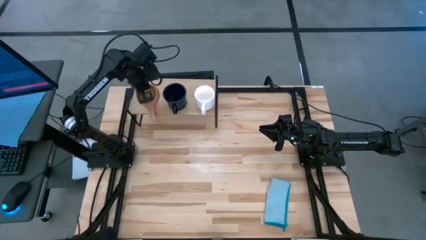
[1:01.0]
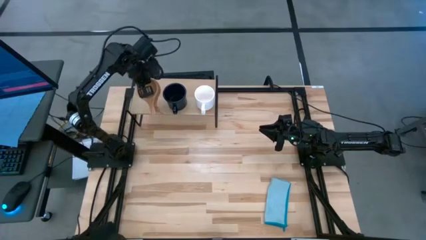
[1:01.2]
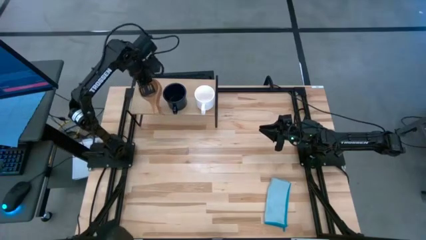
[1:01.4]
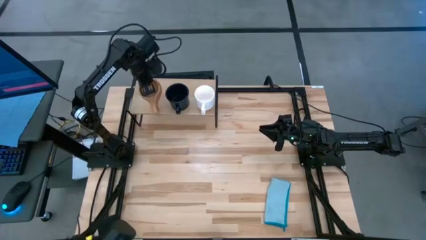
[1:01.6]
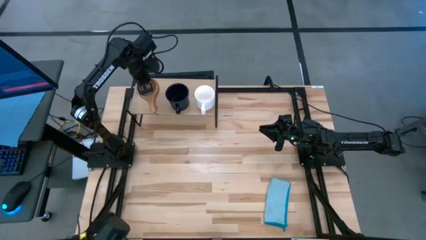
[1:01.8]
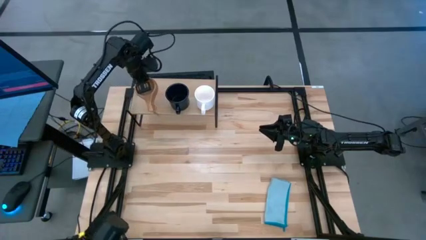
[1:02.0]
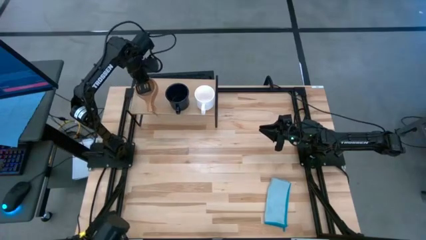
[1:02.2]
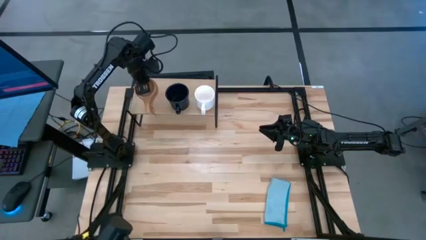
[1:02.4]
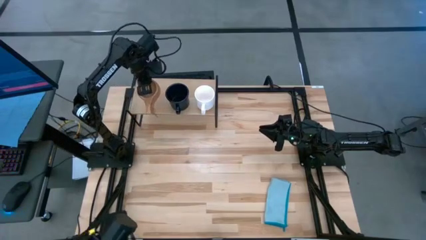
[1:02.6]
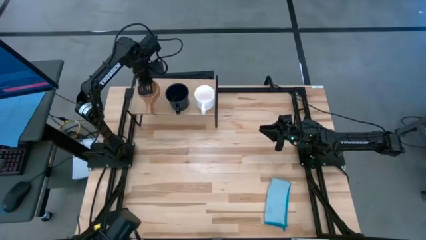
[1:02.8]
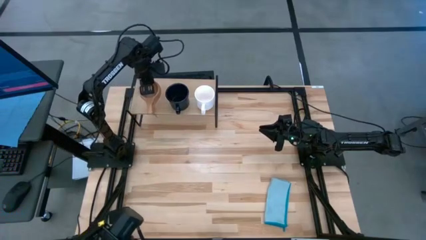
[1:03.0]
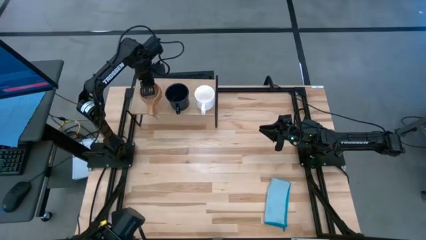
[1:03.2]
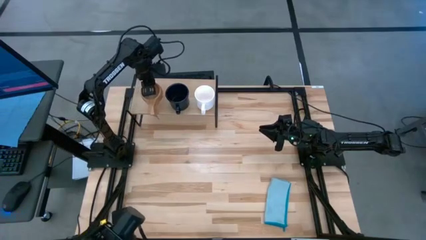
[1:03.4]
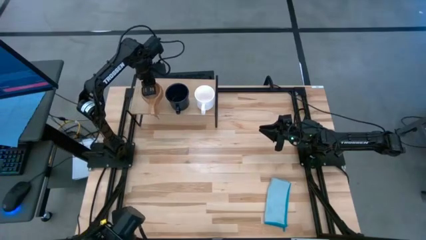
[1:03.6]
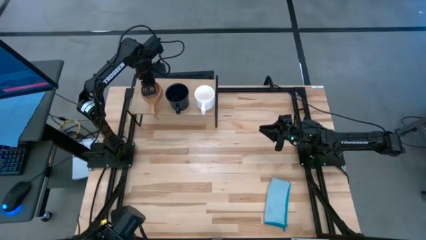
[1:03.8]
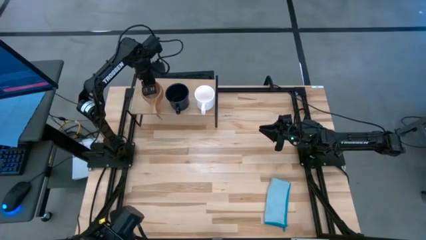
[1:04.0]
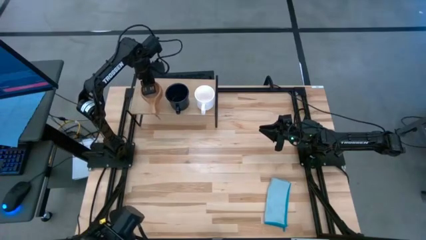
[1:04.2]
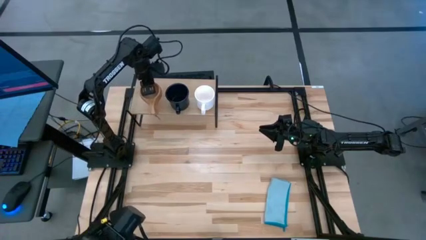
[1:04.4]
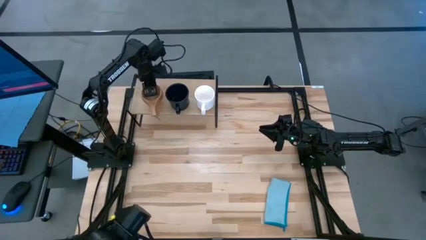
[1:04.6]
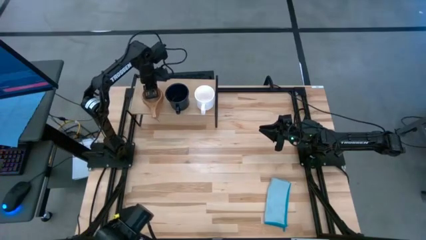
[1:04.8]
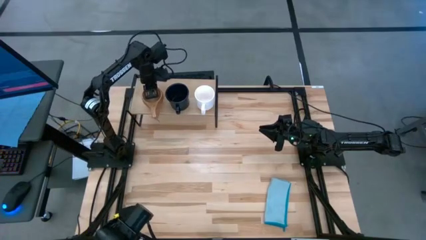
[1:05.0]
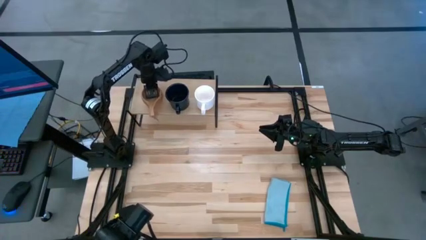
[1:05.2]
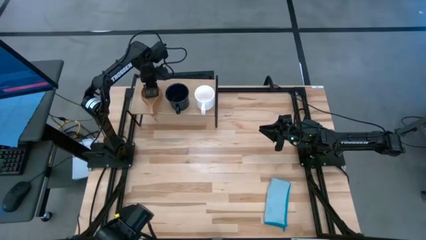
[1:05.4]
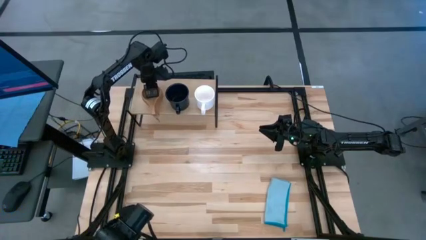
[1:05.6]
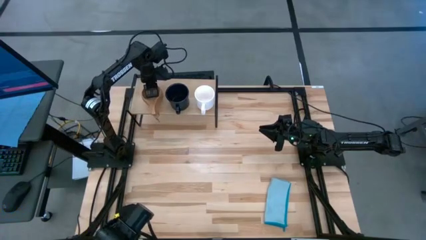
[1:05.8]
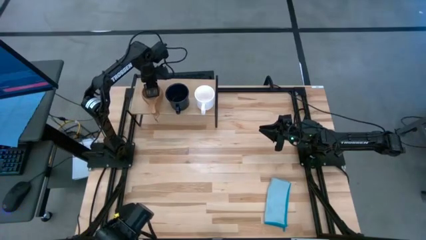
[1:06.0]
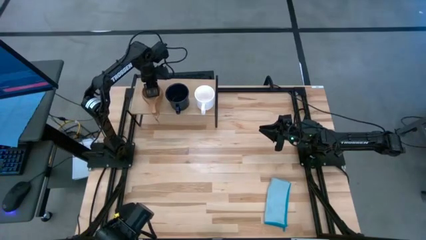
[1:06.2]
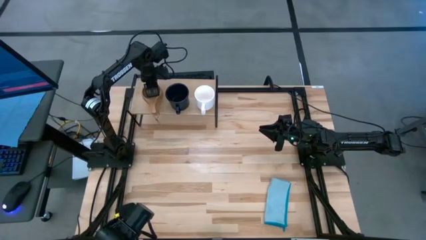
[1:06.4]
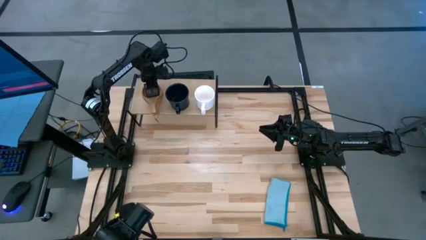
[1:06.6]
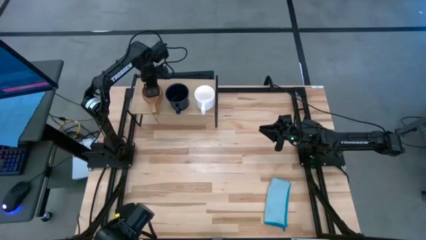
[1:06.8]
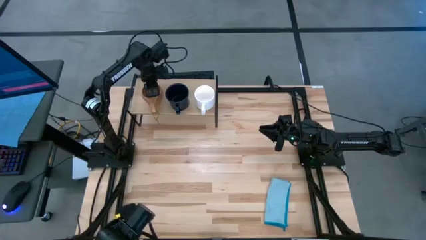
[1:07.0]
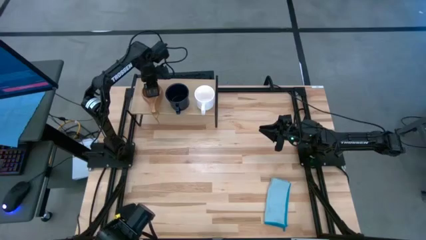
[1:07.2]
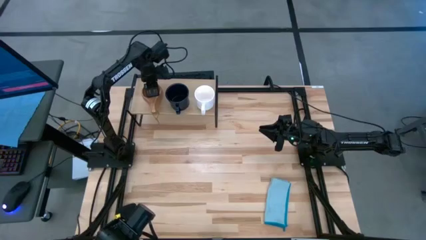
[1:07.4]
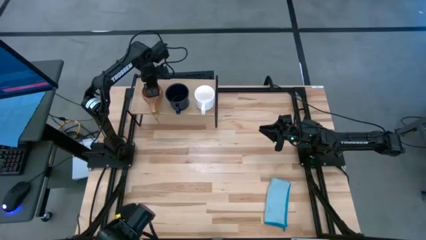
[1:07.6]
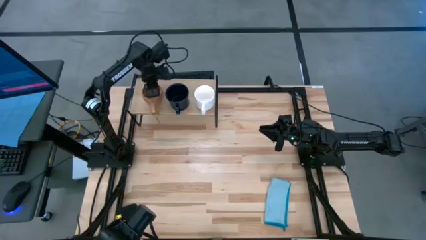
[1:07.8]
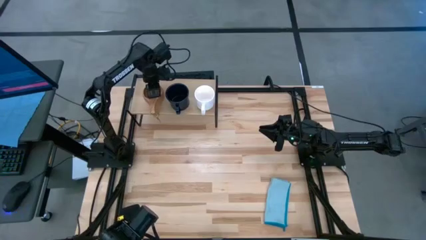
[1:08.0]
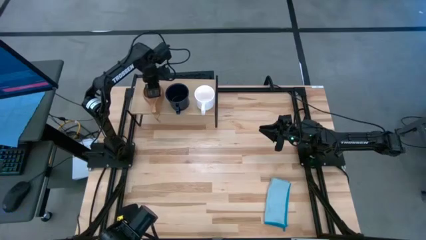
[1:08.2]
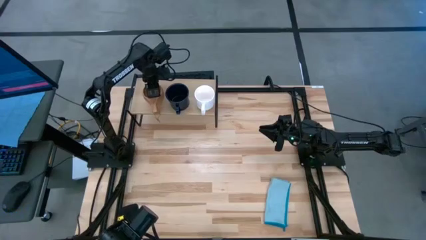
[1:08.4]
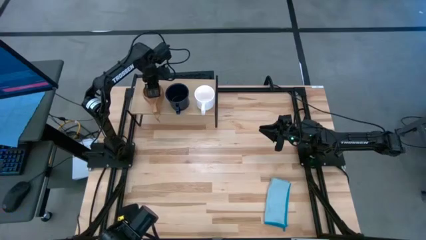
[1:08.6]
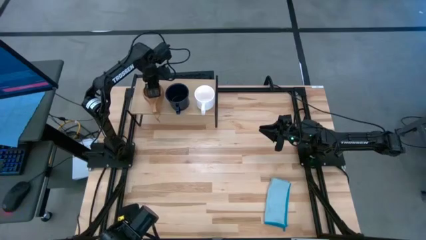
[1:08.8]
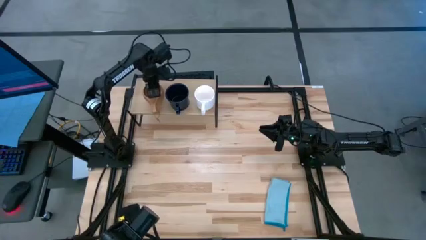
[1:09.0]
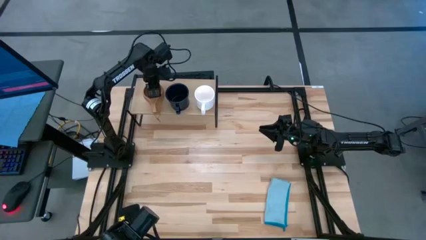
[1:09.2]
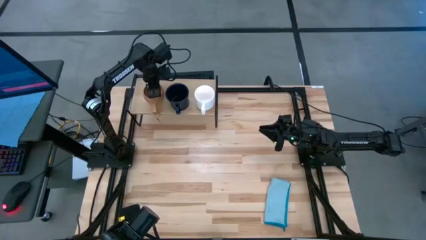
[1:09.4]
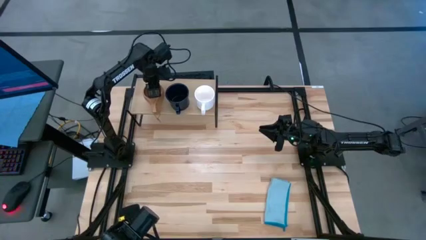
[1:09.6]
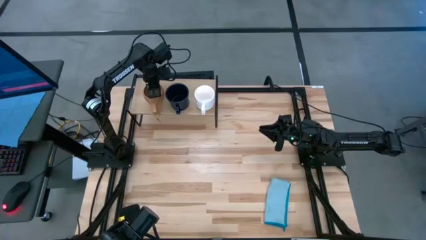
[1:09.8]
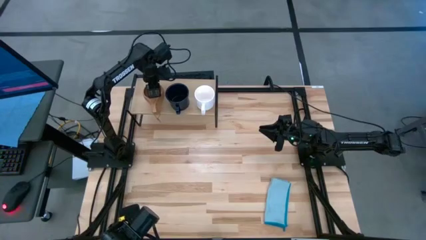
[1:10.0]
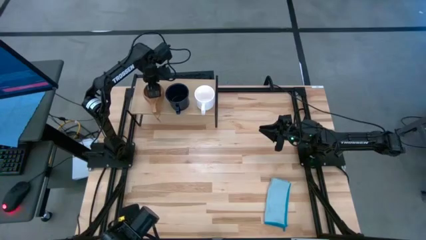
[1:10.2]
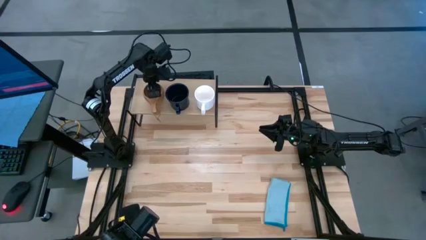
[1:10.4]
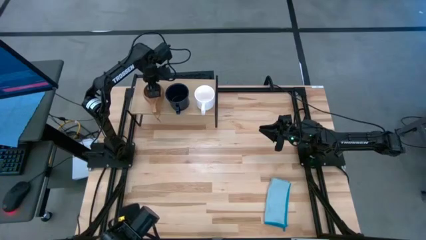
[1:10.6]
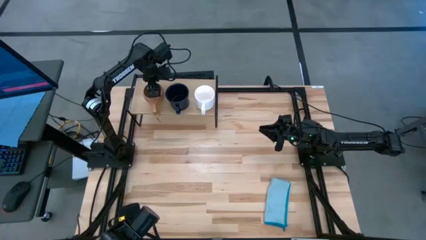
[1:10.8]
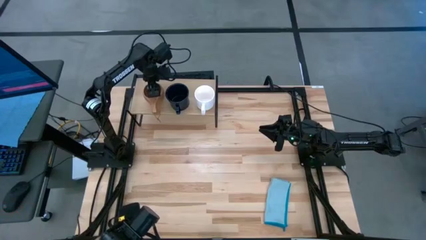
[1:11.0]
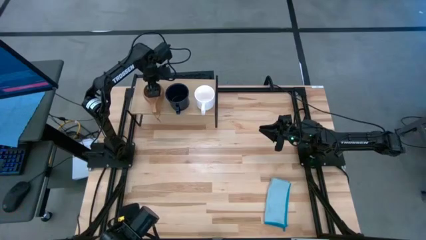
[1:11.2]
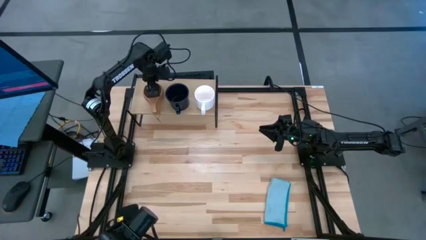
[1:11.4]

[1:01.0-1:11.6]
Task: Stack small to large cups/mugs on shelf
Put the brown mug on the shelf

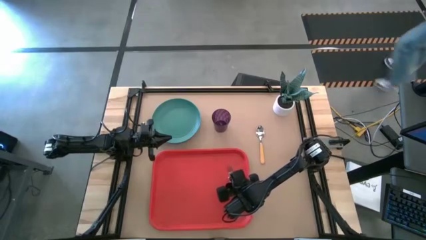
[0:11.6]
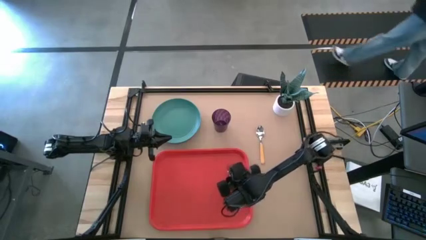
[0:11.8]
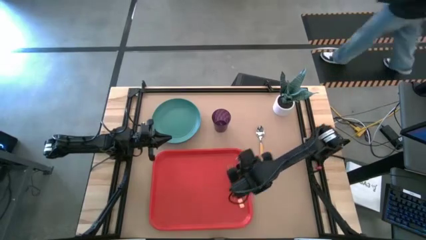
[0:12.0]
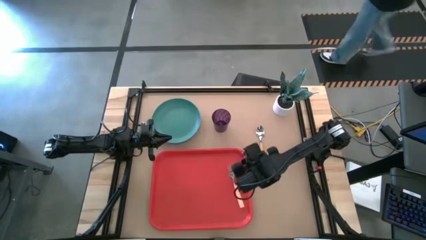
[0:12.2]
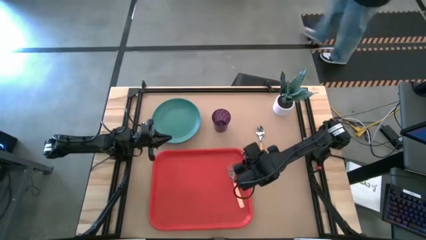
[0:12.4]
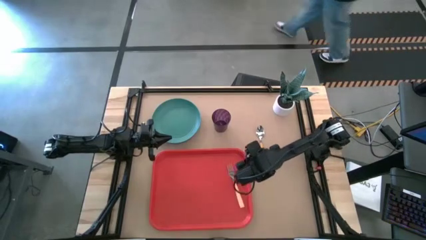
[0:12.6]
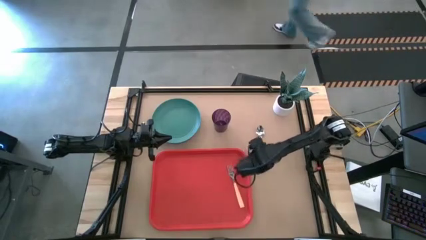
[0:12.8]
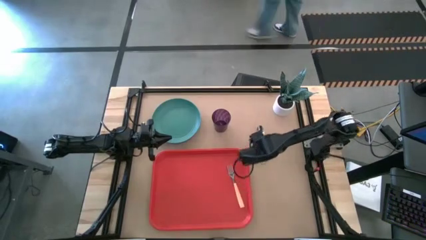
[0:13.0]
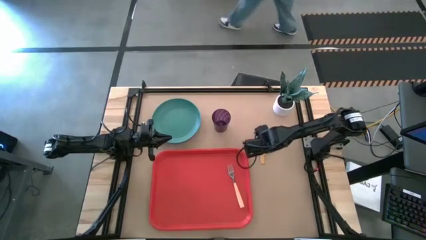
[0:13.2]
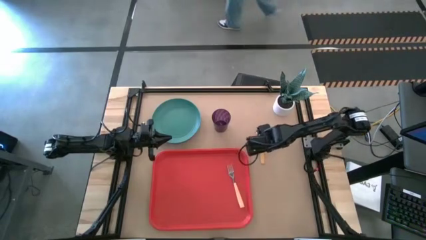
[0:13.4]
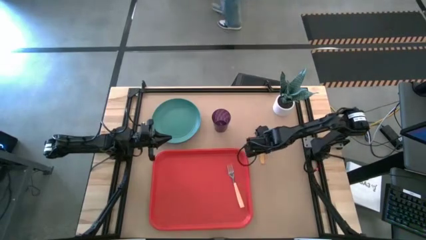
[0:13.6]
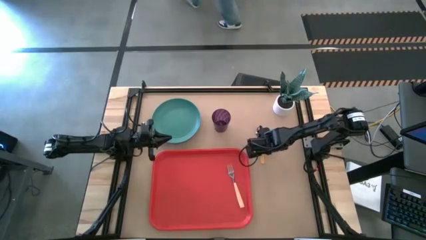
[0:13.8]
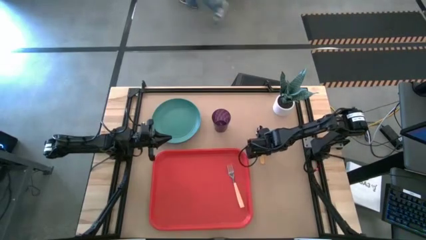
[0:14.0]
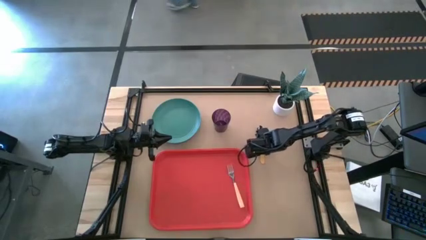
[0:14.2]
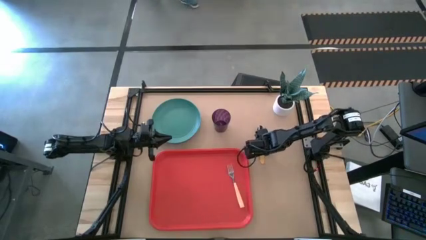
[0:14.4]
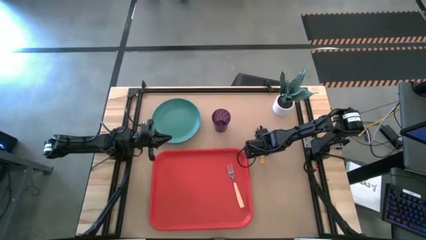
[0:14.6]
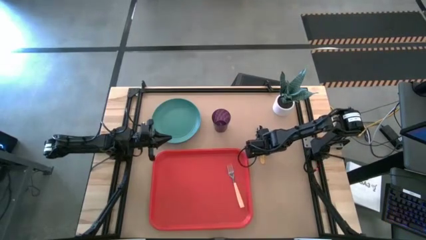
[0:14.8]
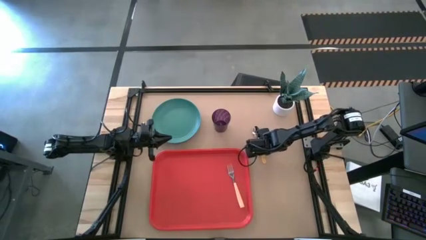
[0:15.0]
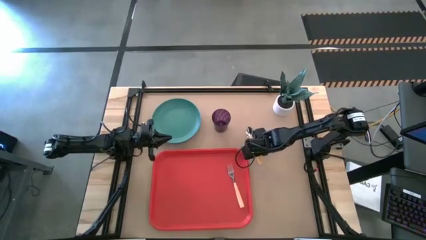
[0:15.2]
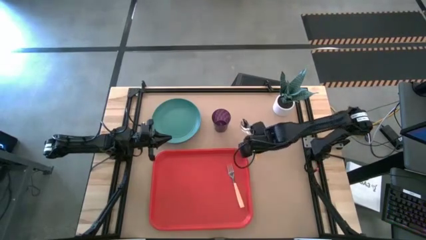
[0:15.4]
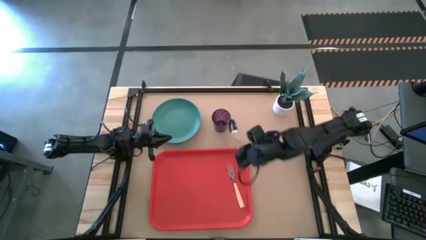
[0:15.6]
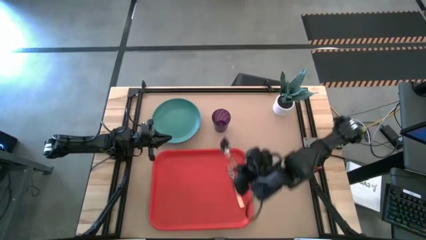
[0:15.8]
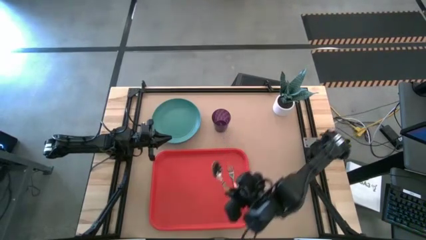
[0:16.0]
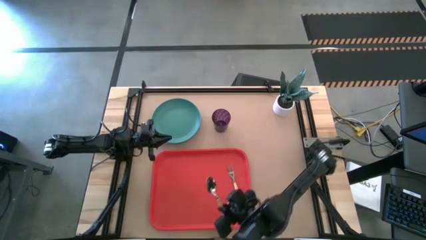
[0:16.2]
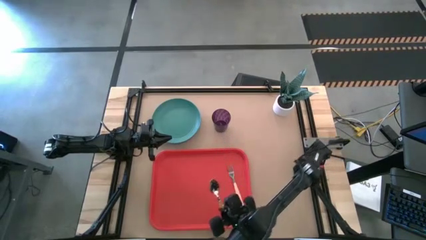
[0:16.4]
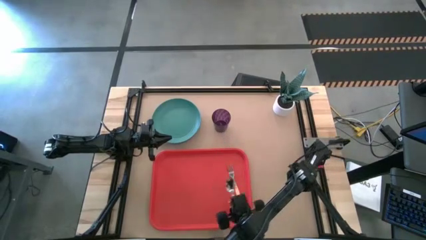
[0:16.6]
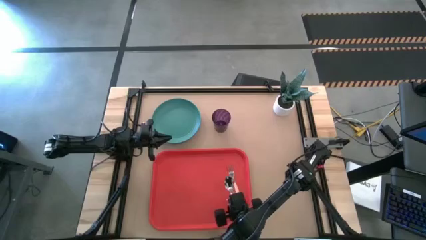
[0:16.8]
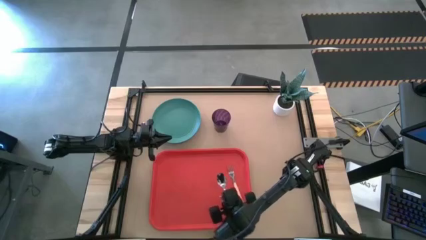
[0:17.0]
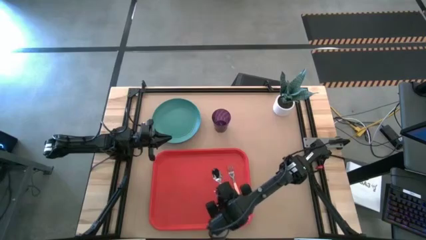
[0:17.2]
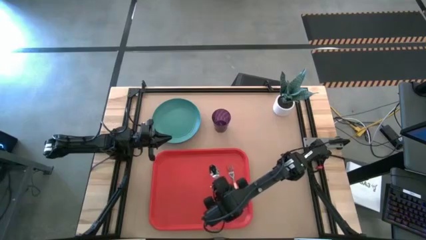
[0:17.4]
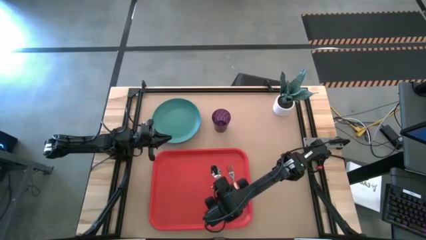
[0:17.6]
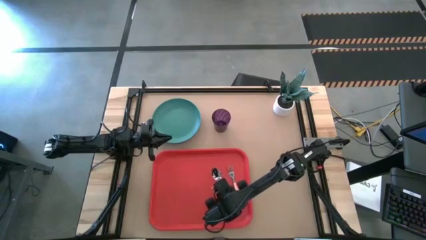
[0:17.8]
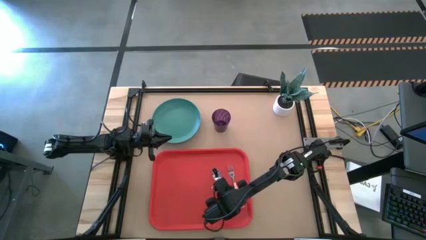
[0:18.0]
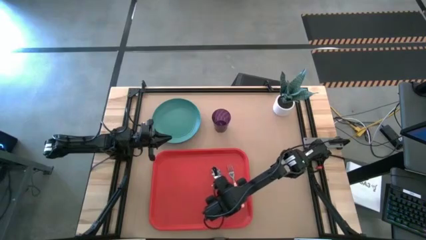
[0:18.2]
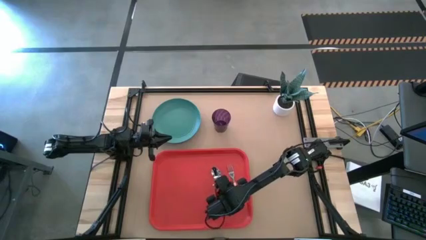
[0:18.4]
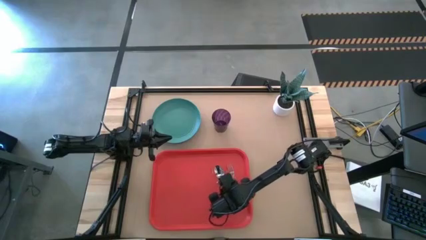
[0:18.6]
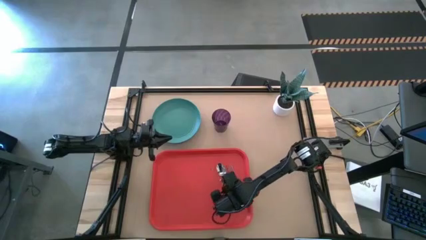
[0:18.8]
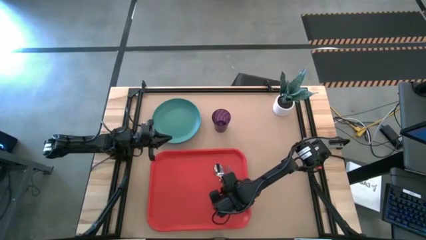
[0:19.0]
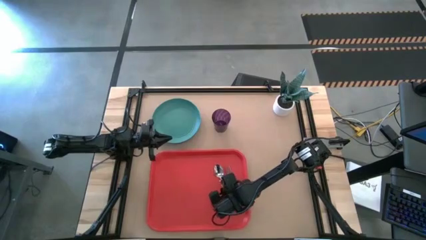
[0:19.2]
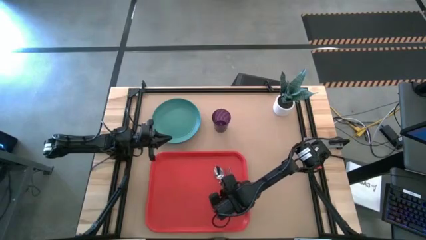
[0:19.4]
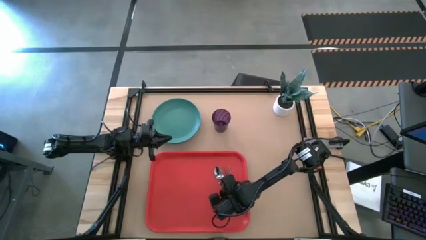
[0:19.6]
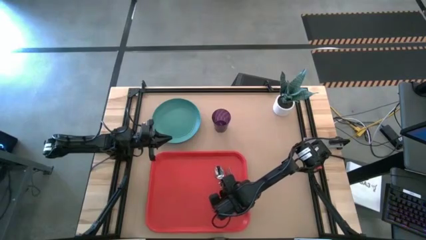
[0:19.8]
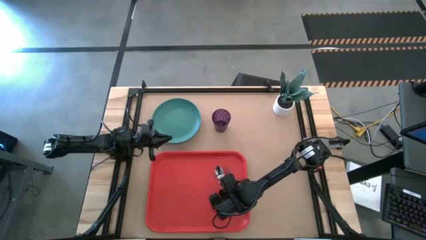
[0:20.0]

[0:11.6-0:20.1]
Task: Pick and place plate/cup/fork/spoon on tray
Put the orange spoon on the red serving tray to the left of the orange fork
